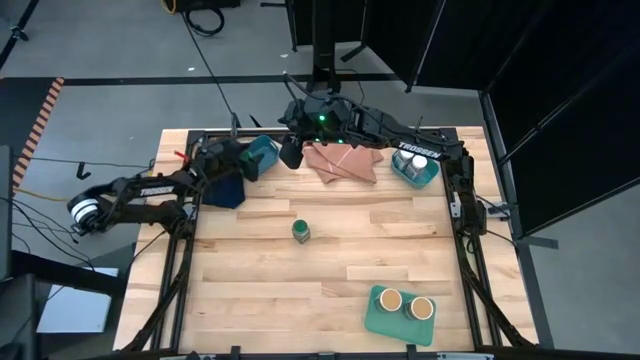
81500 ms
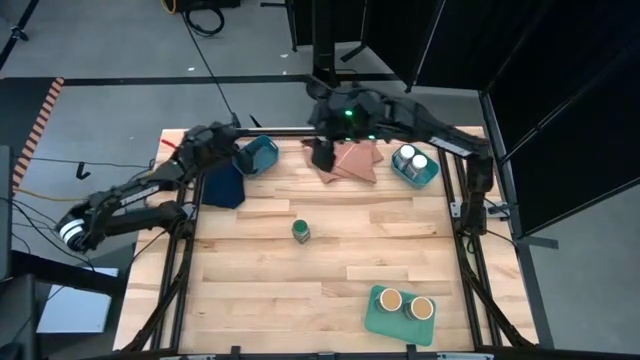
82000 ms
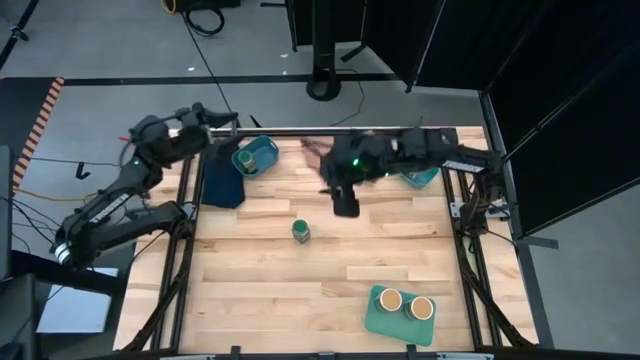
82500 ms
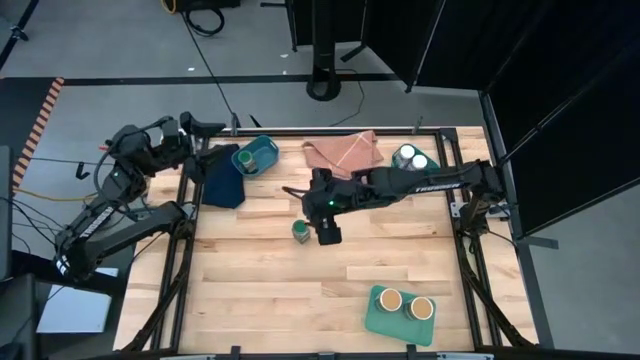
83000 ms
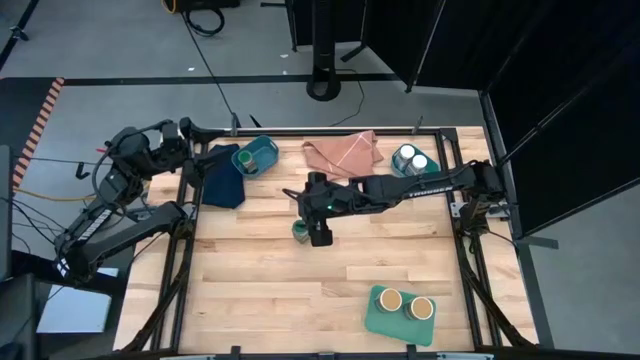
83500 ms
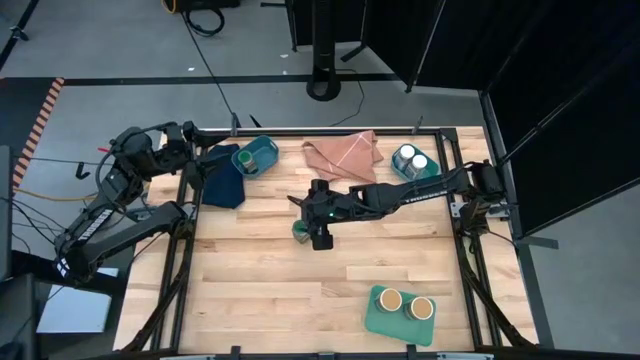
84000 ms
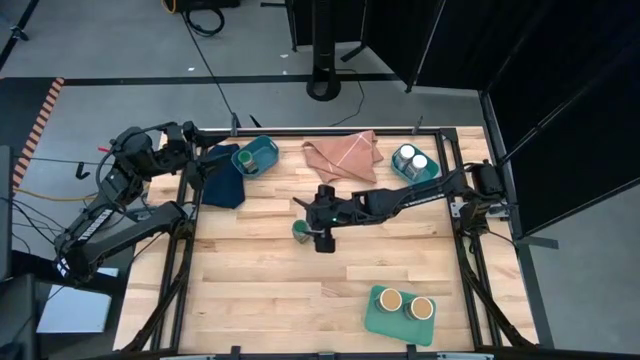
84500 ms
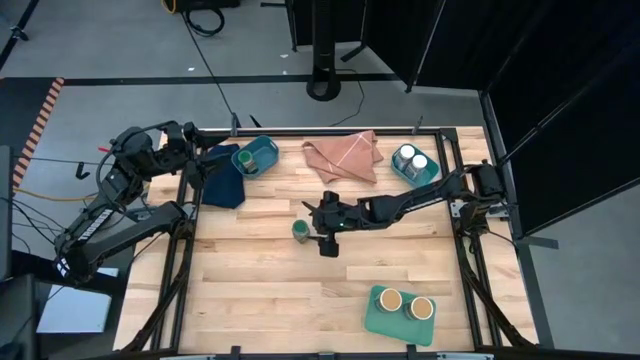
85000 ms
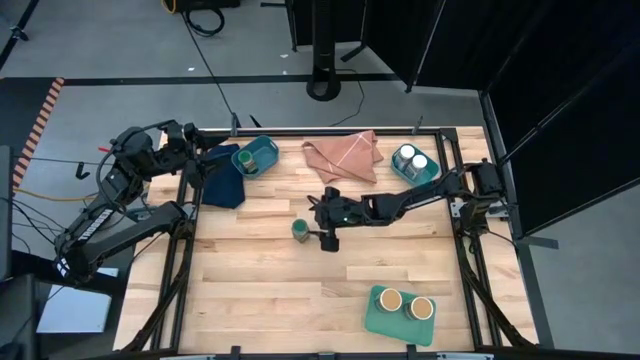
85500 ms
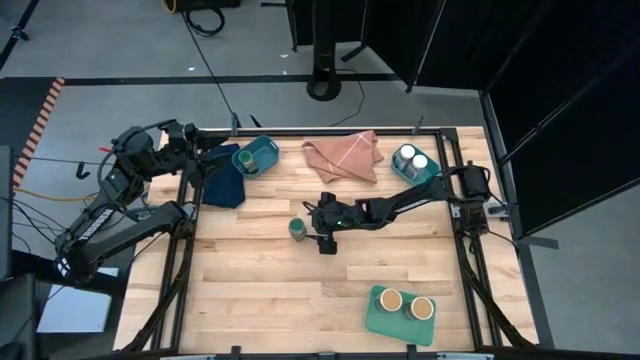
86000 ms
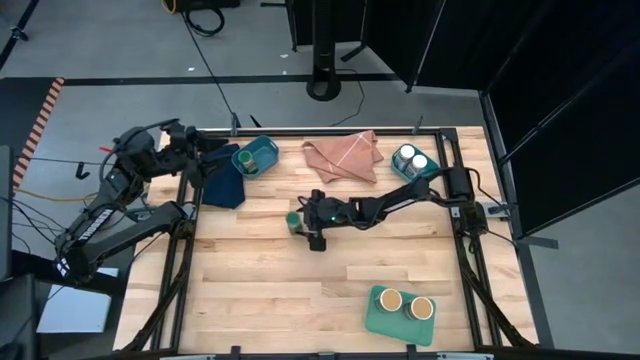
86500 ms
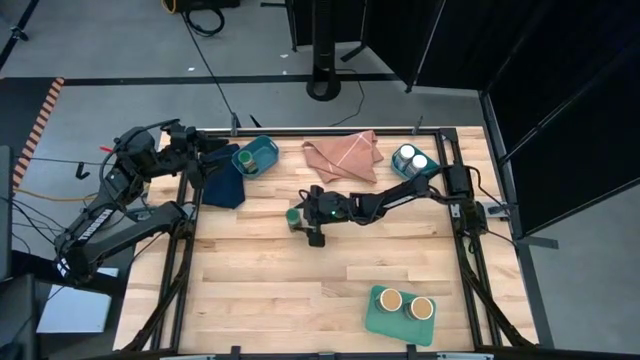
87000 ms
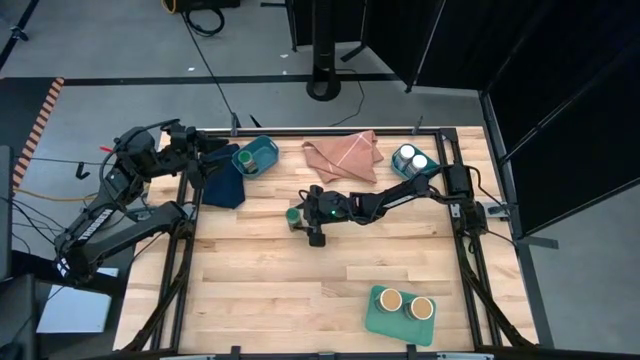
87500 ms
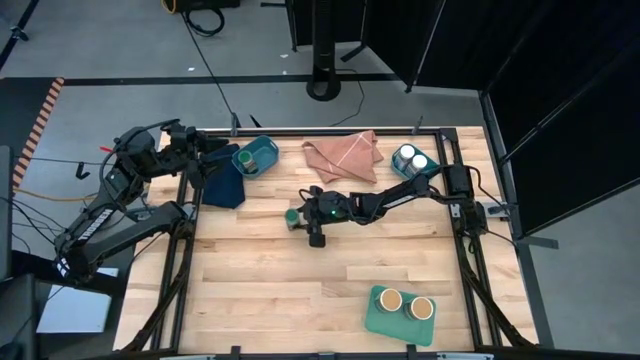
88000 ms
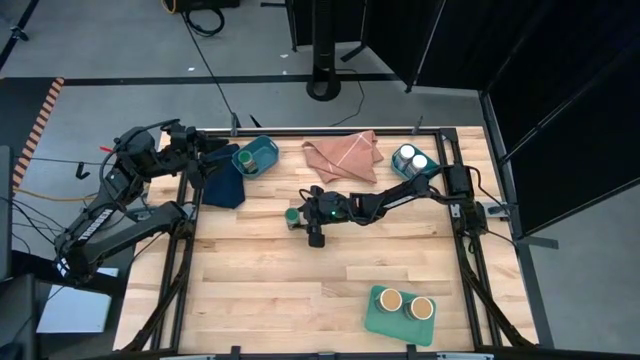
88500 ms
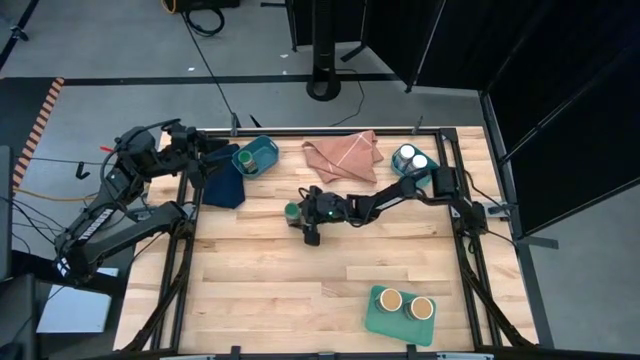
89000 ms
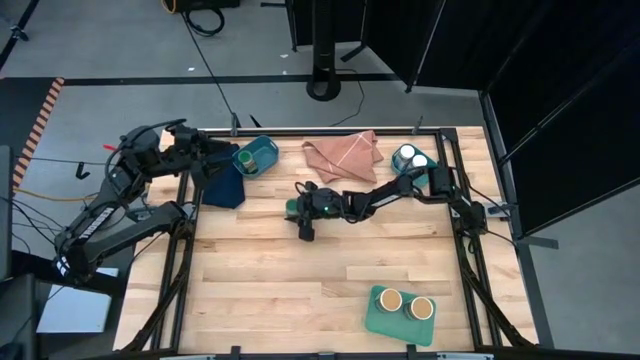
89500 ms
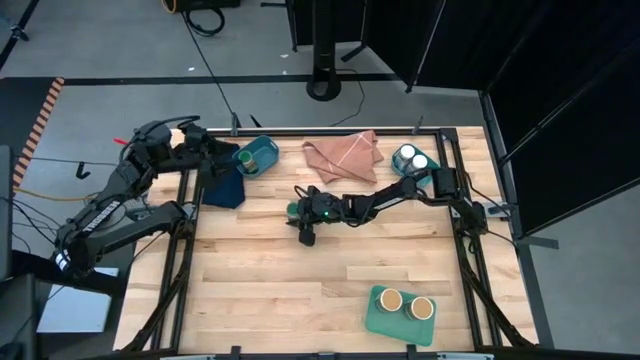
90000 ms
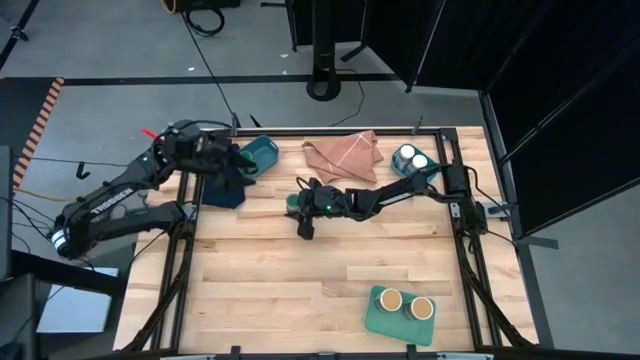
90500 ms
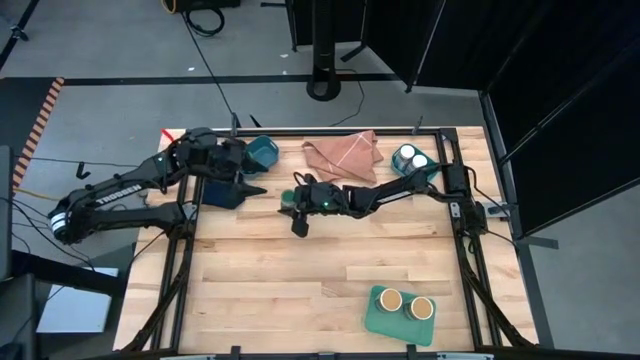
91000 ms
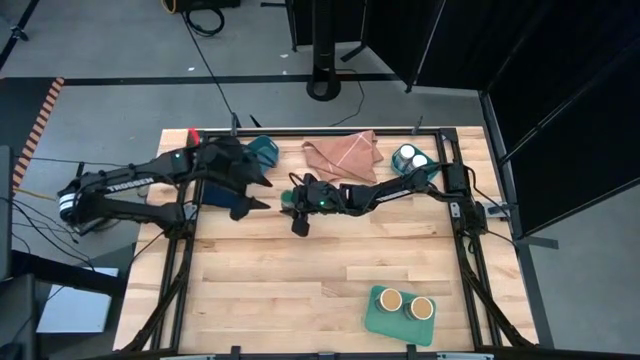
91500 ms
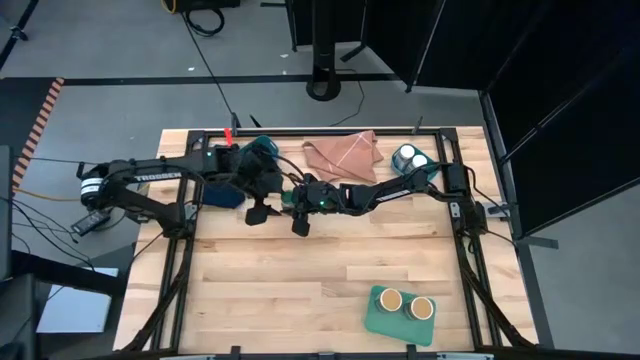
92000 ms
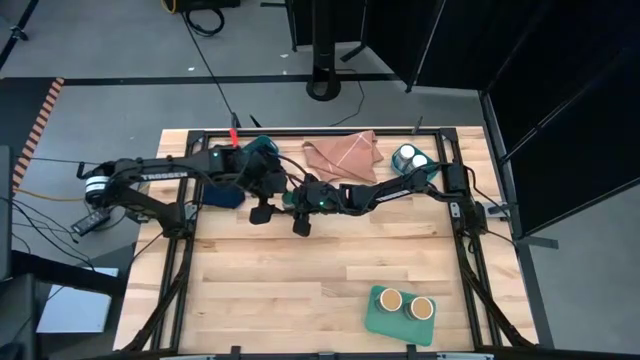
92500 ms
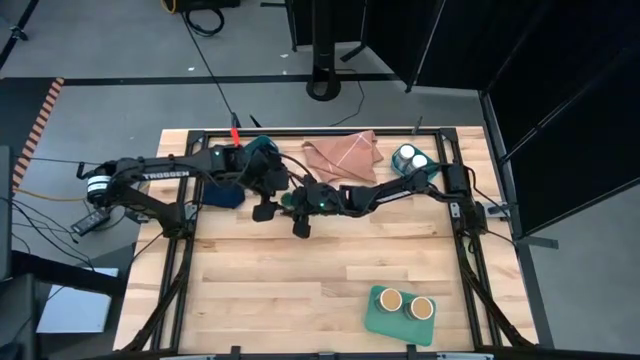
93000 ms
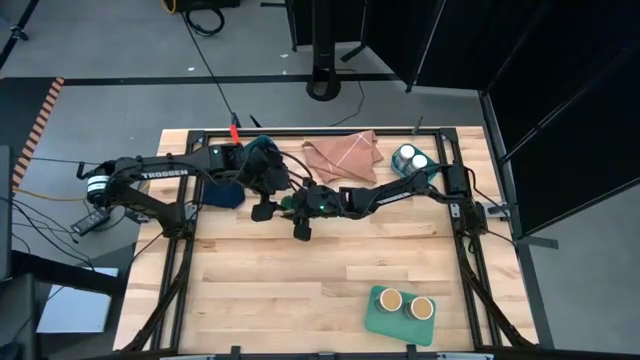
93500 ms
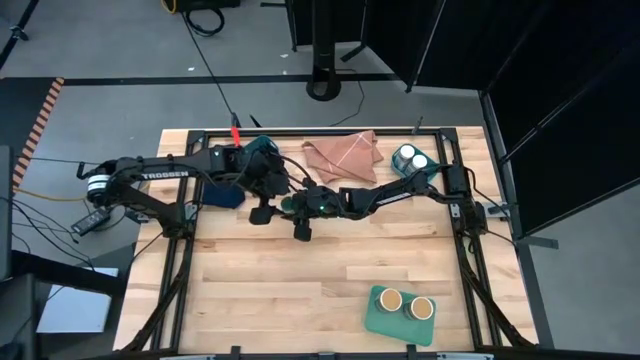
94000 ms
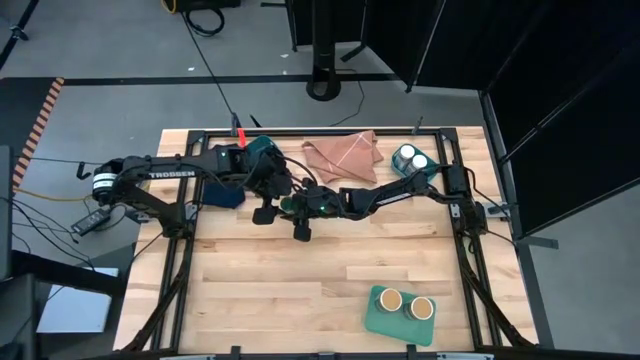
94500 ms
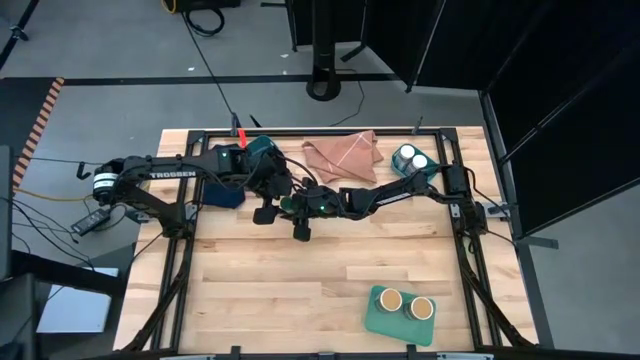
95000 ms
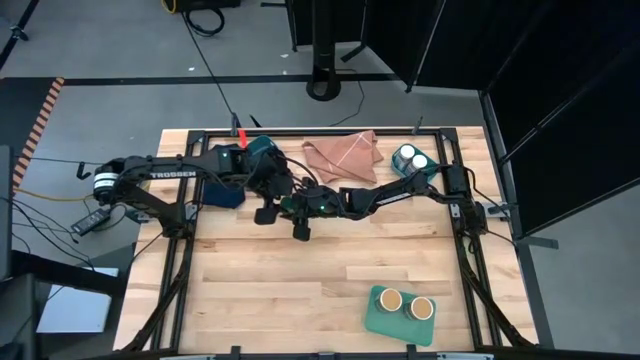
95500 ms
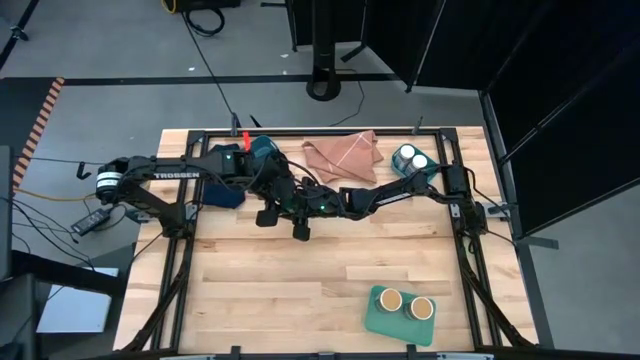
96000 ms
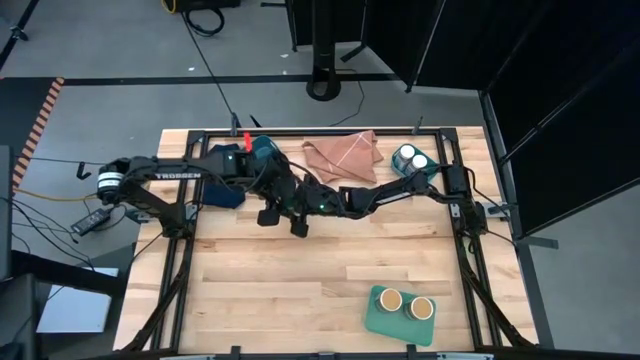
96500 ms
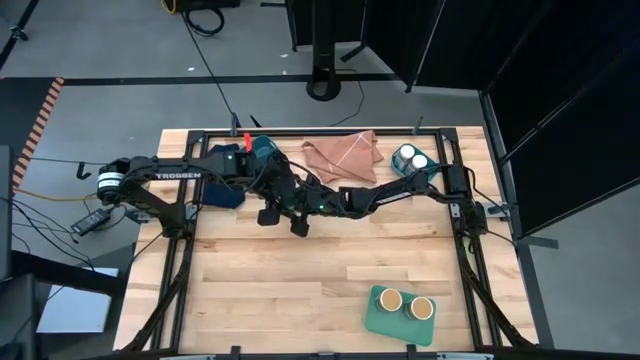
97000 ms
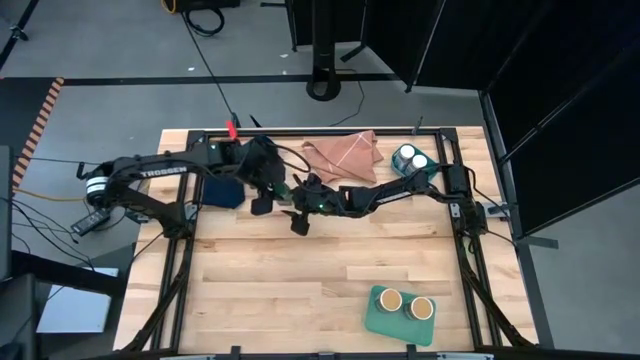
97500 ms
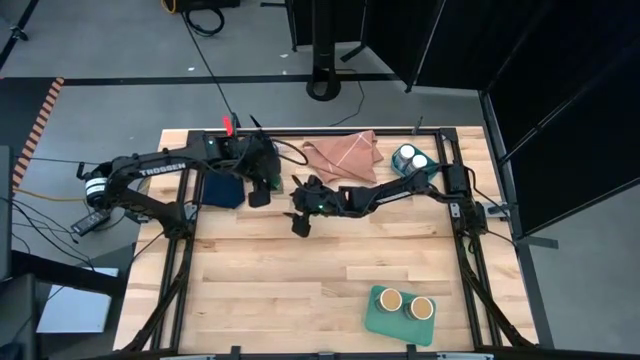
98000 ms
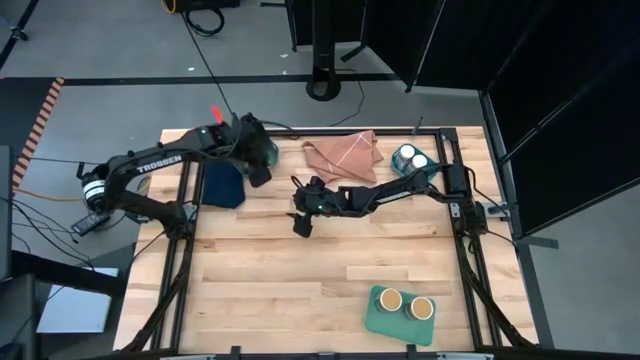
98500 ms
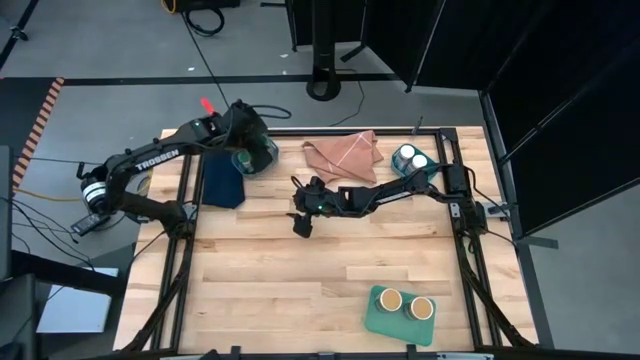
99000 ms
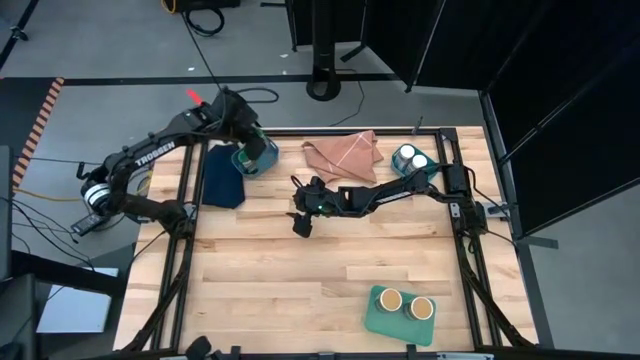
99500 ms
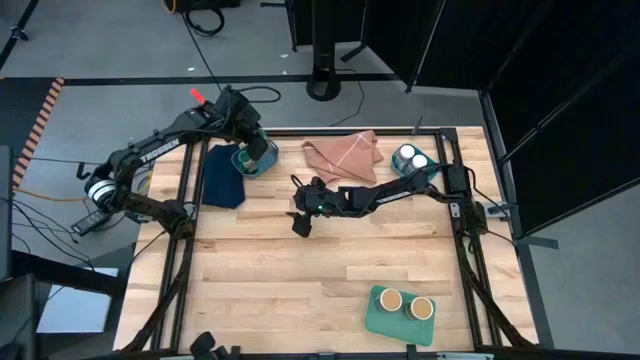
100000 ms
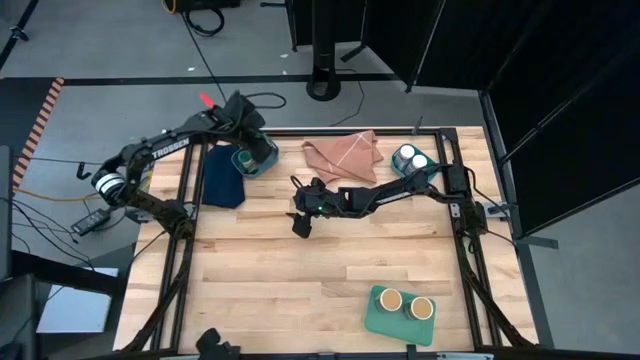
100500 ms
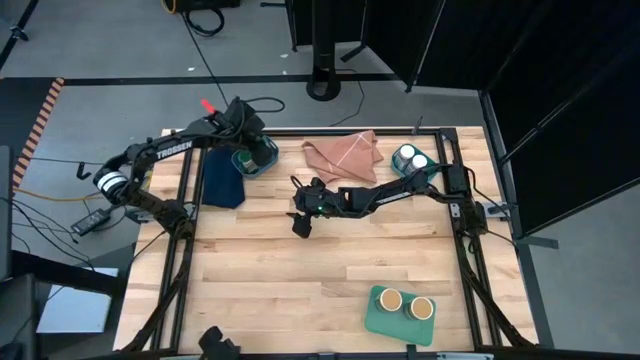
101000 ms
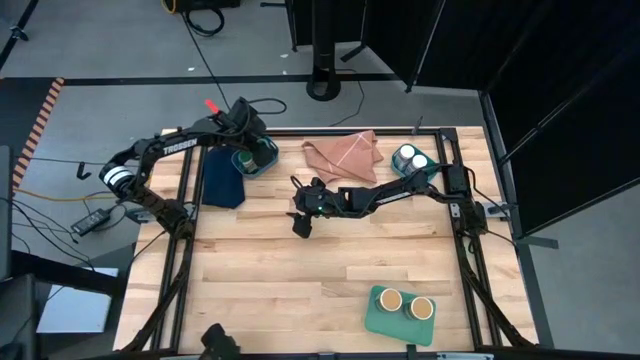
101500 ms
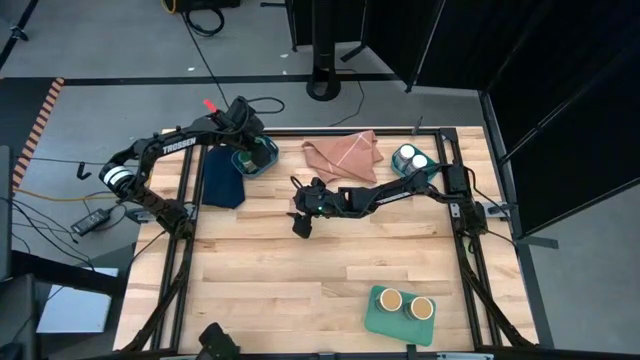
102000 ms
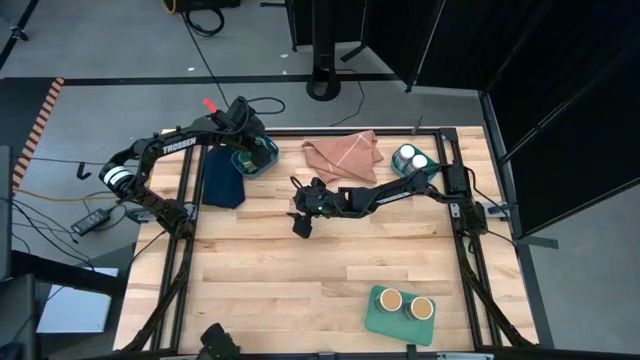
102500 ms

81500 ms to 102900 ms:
Task: Sort spices by type
Put the green seasoning bottle into the blue bin

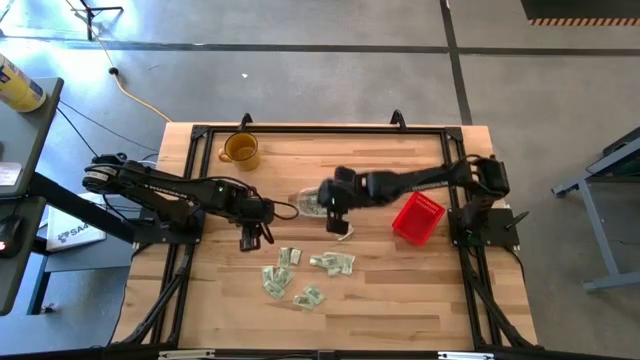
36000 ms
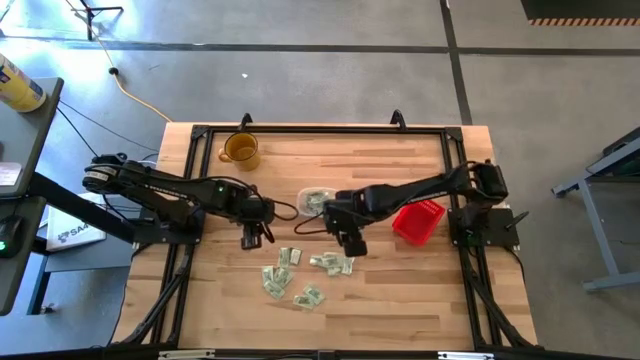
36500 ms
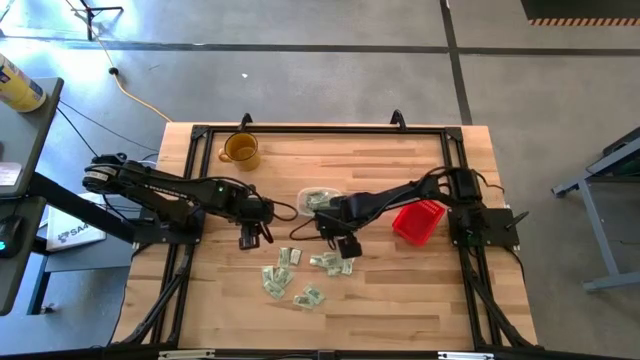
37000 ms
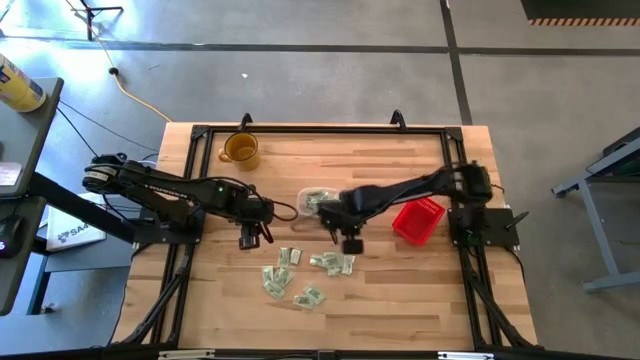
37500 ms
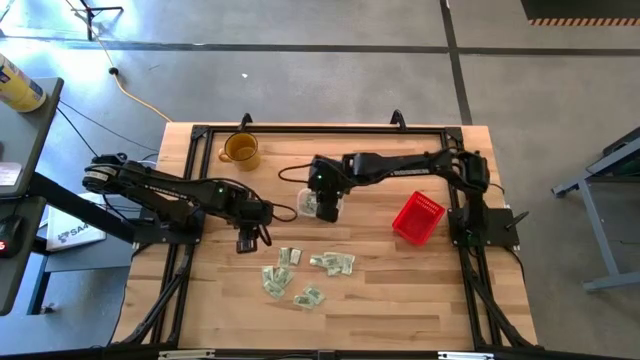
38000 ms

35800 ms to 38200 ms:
Task: Pick and place items into bin
Put the white stevia packet into the transparent bin
